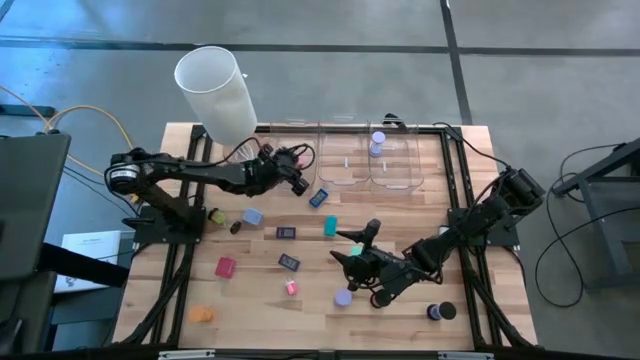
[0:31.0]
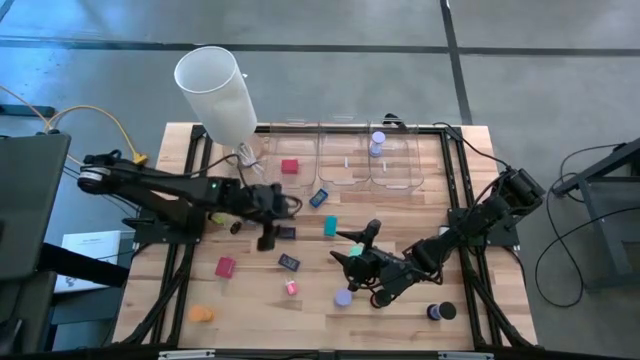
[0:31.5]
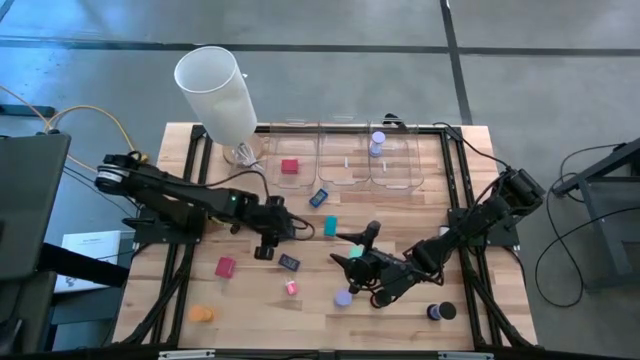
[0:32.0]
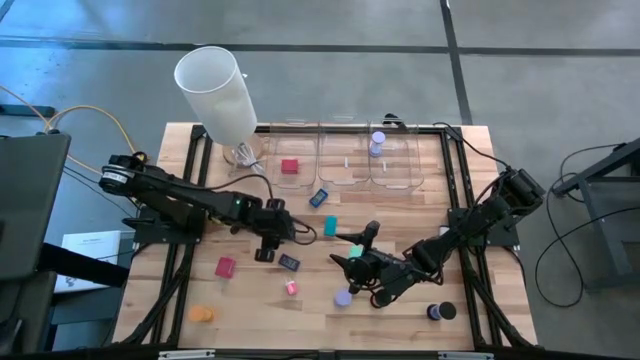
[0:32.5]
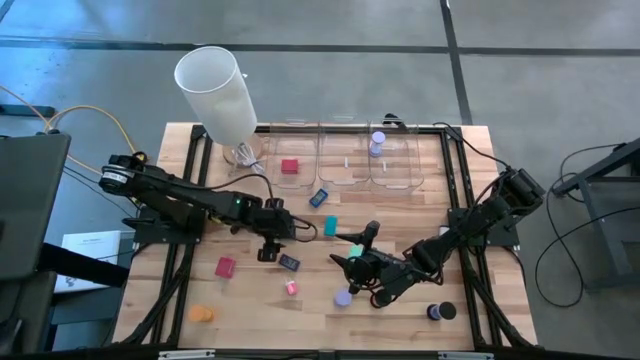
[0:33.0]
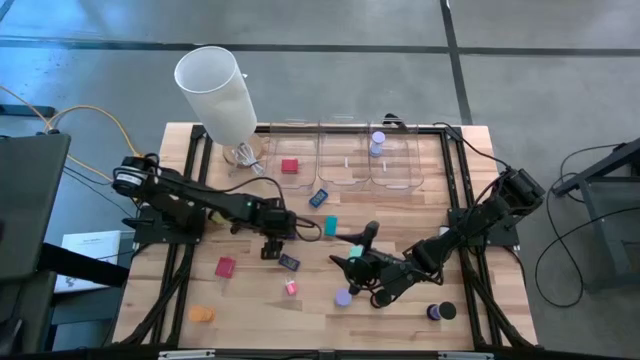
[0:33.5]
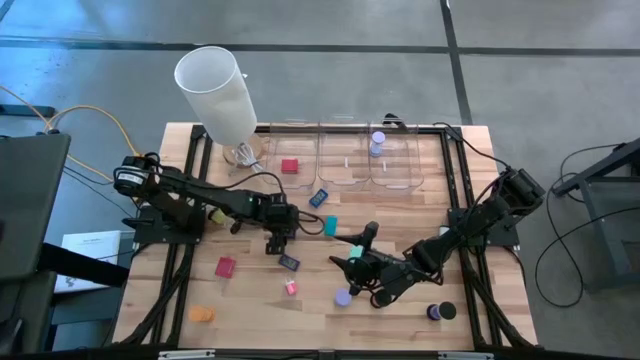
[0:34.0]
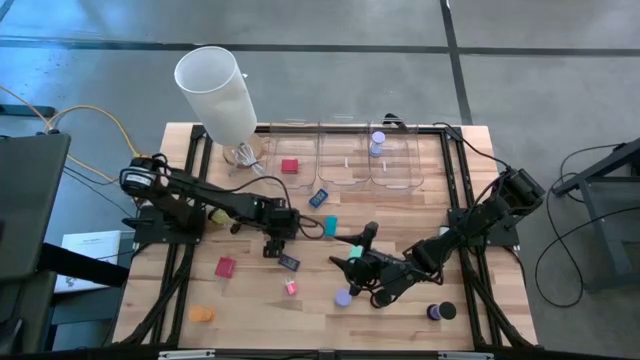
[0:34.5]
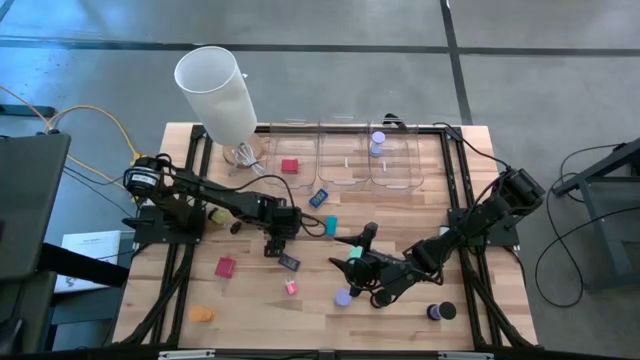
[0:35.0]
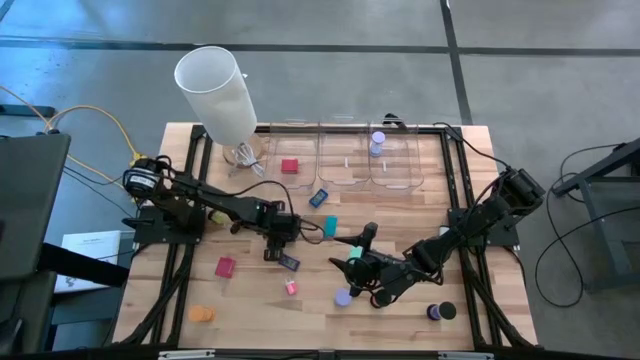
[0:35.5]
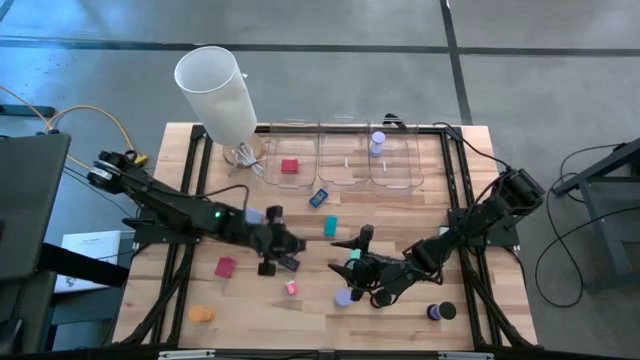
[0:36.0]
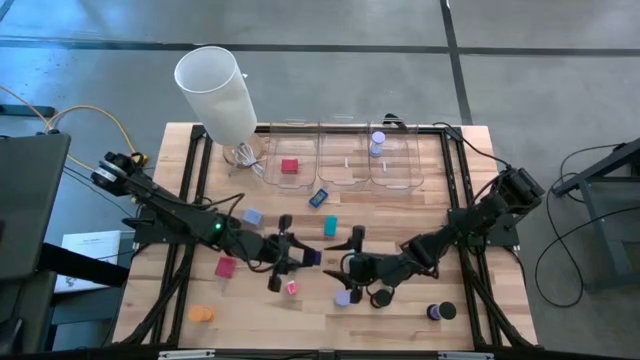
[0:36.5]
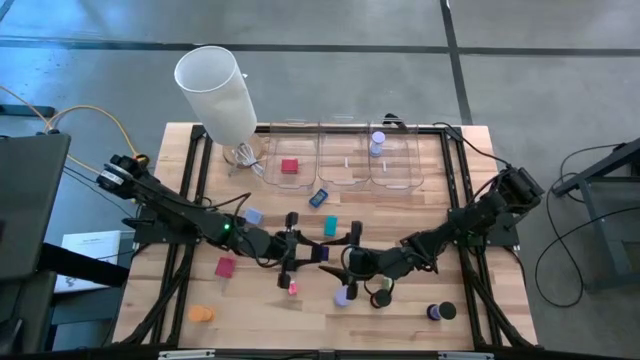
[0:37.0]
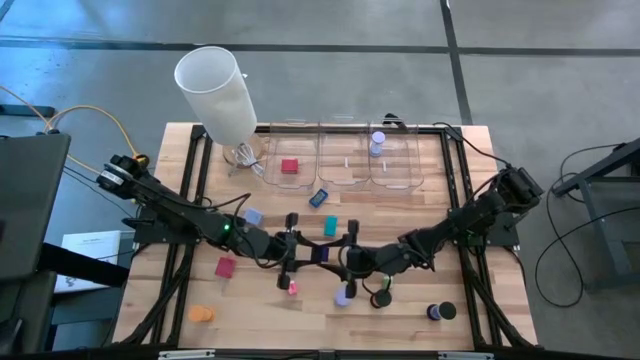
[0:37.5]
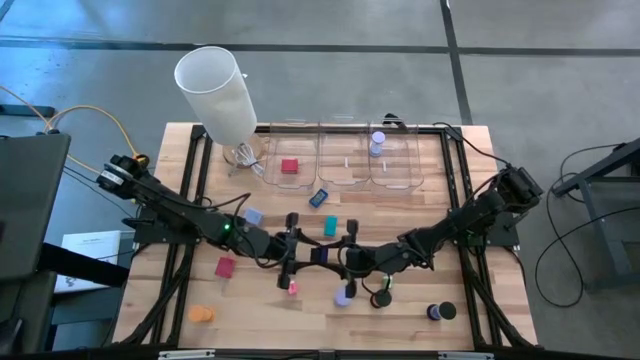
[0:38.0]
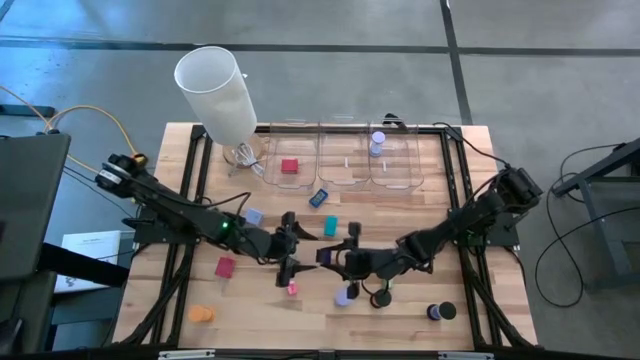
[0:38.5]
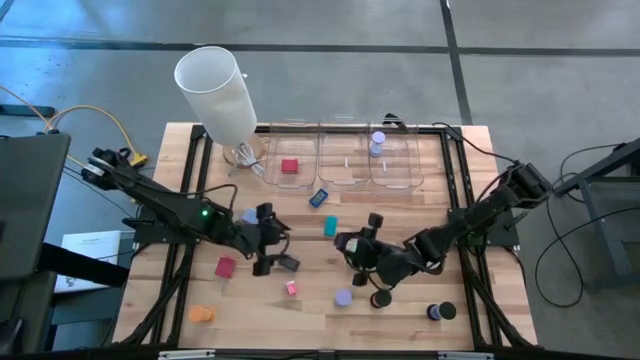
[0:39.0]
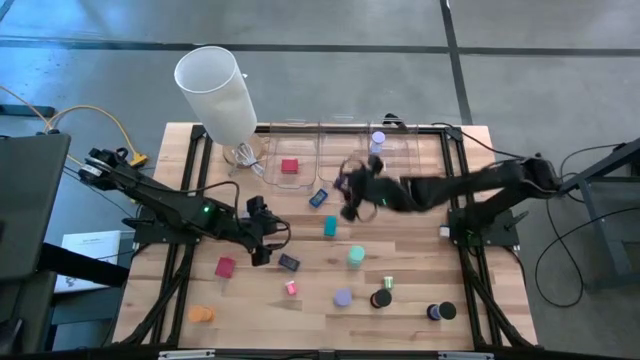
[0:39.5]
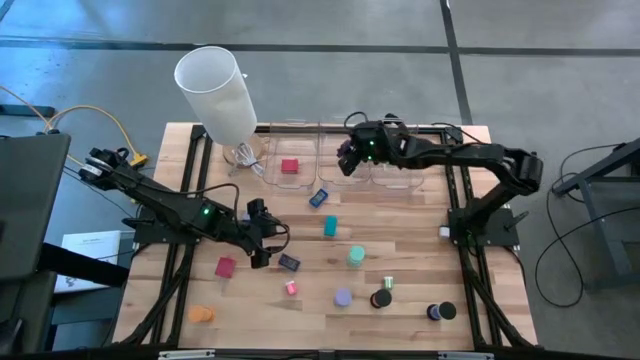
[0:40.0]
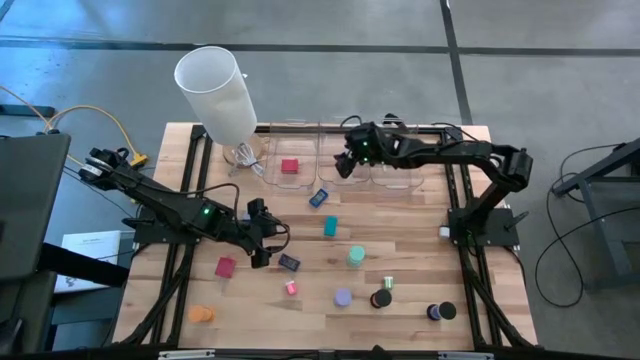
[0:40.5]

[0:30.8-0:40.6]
Task: Pick & Place Office items
Put the top purple digital clock into the middle transparent bin

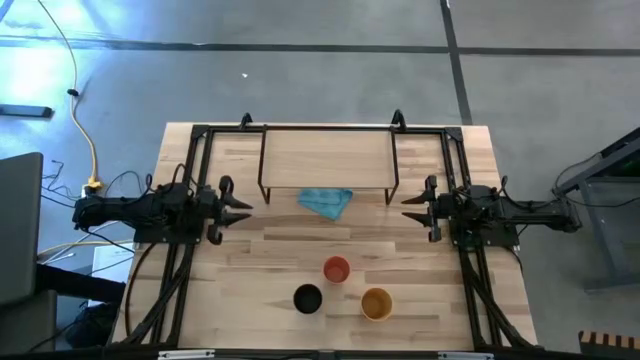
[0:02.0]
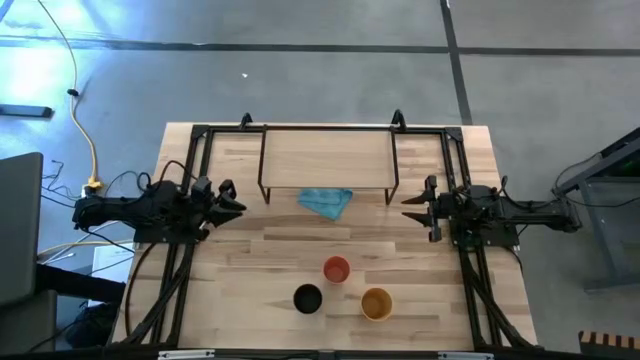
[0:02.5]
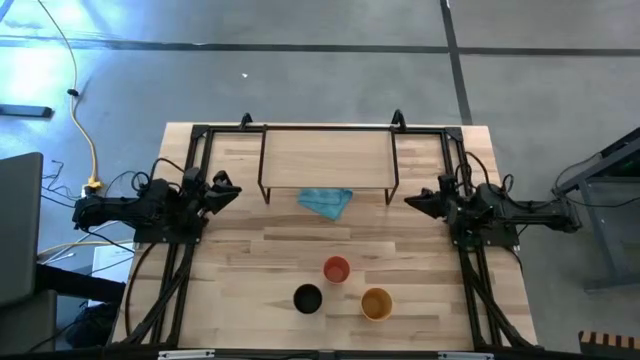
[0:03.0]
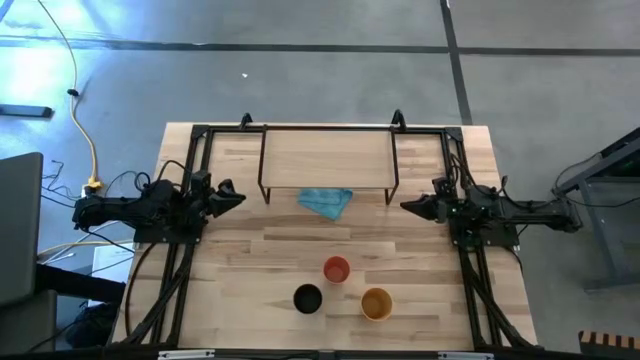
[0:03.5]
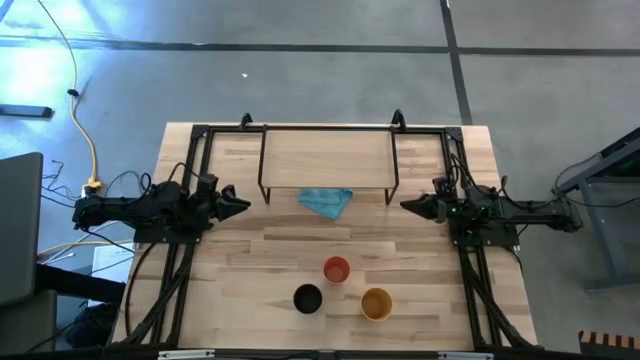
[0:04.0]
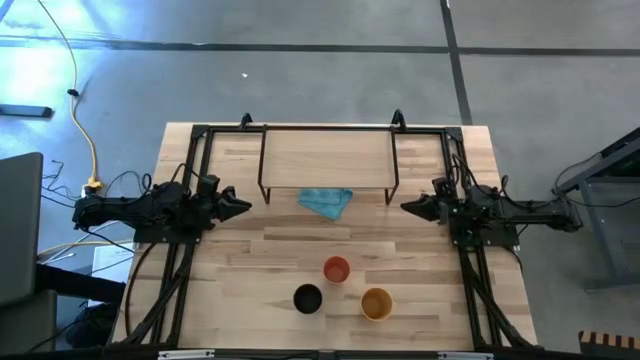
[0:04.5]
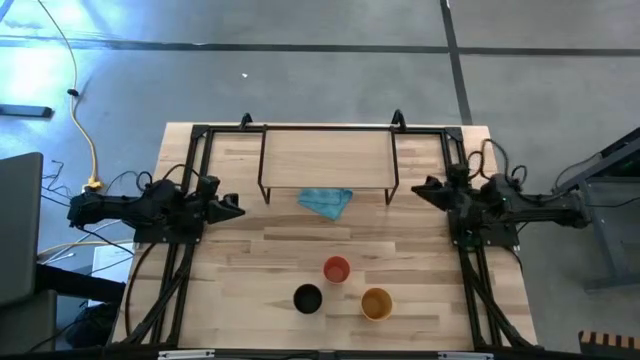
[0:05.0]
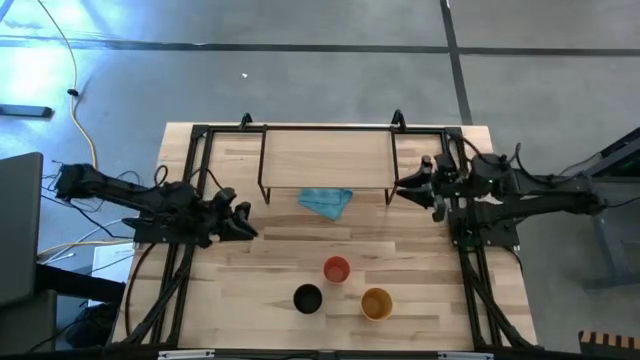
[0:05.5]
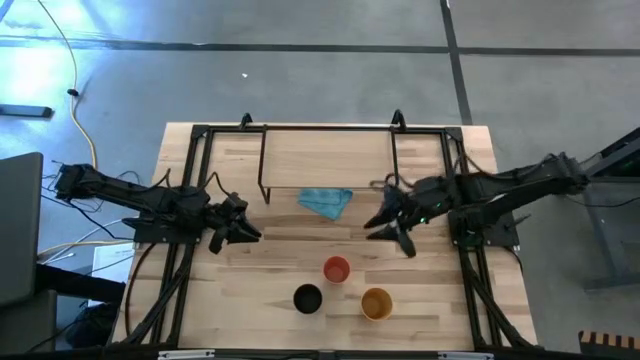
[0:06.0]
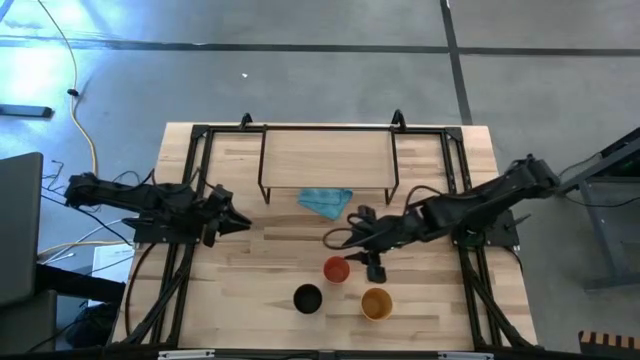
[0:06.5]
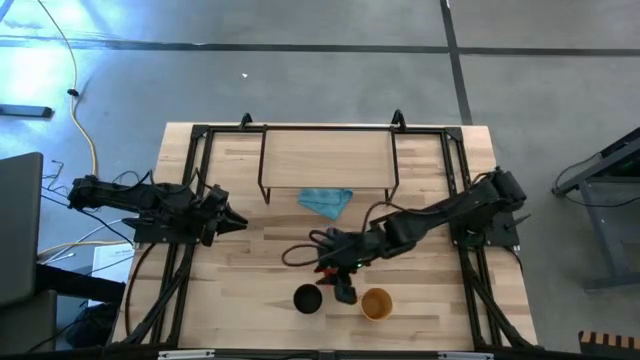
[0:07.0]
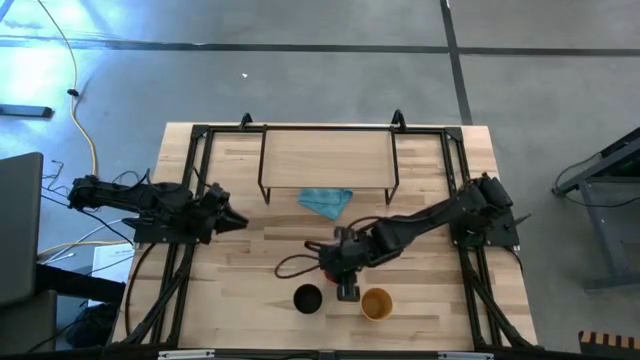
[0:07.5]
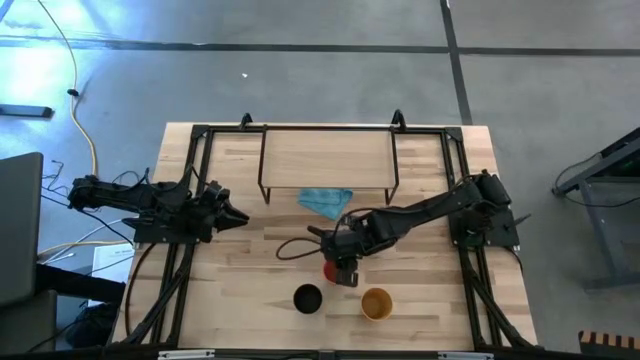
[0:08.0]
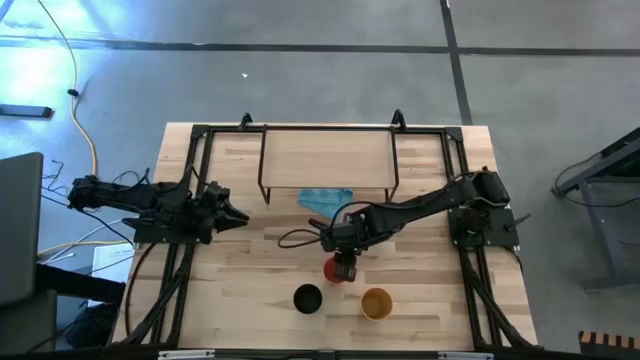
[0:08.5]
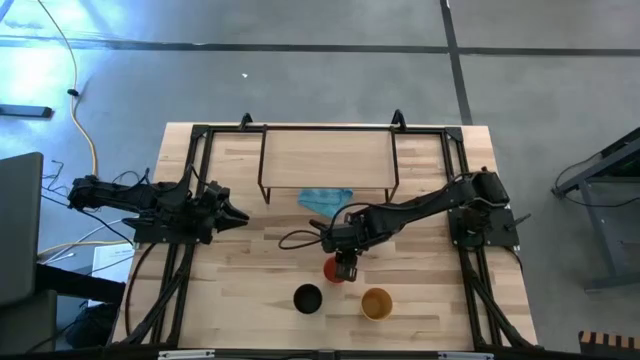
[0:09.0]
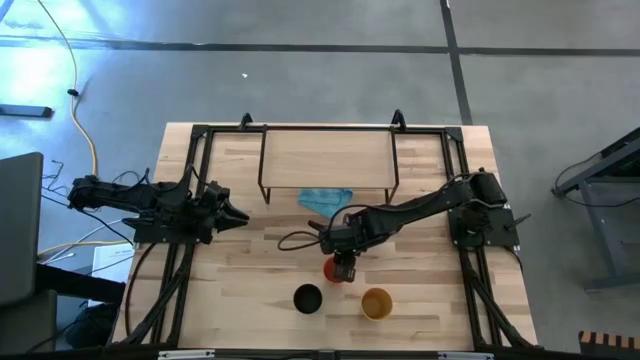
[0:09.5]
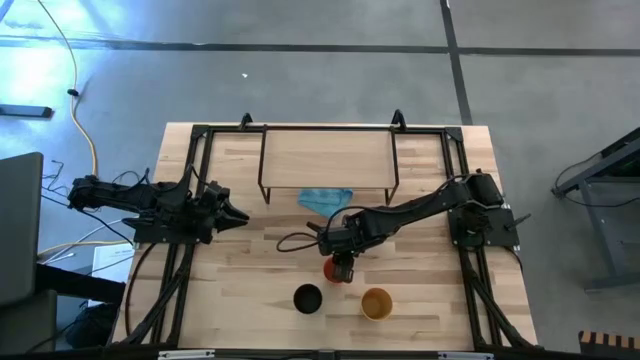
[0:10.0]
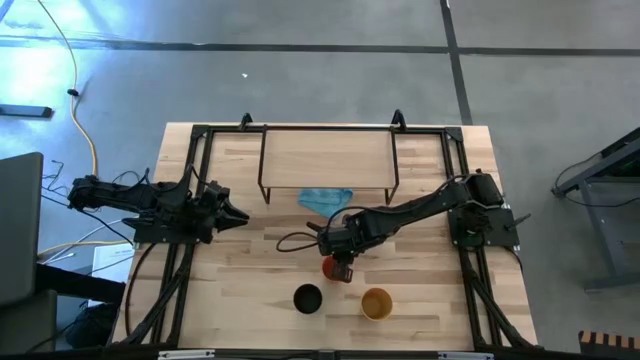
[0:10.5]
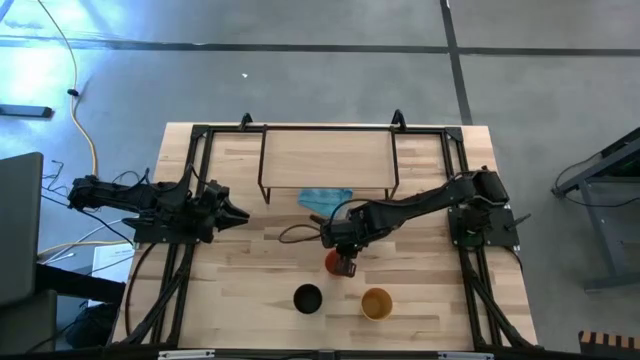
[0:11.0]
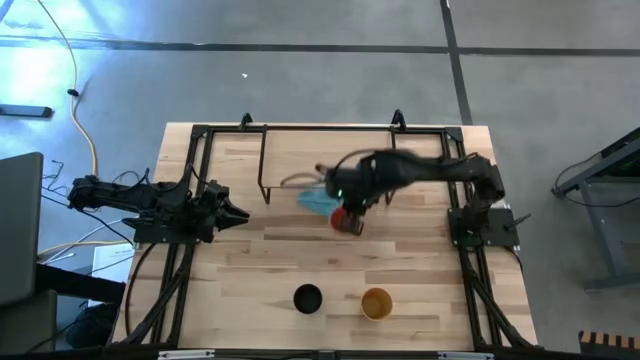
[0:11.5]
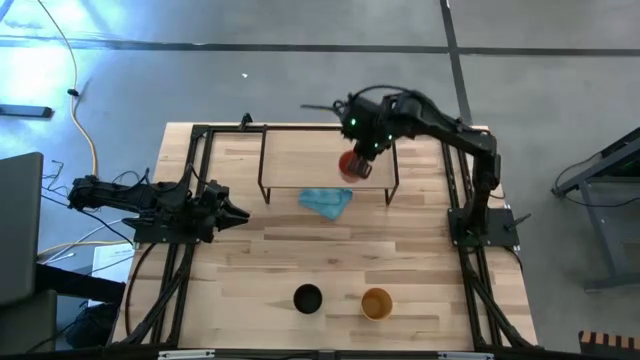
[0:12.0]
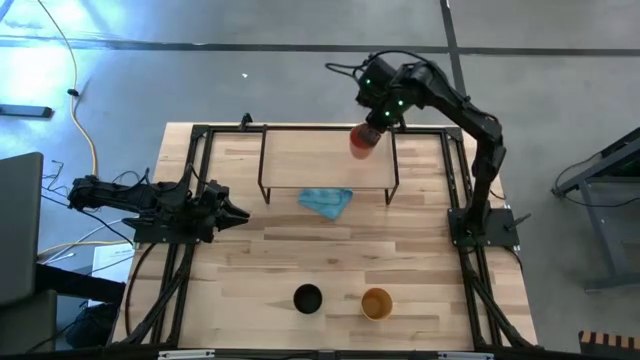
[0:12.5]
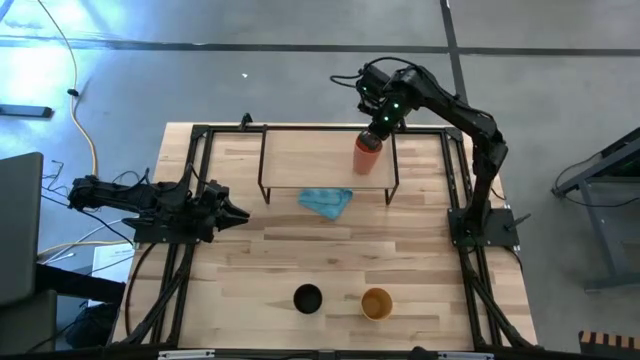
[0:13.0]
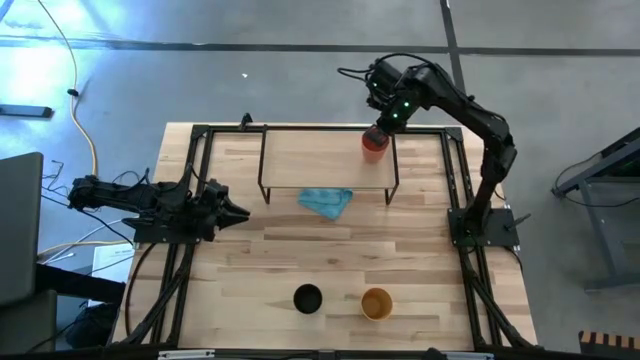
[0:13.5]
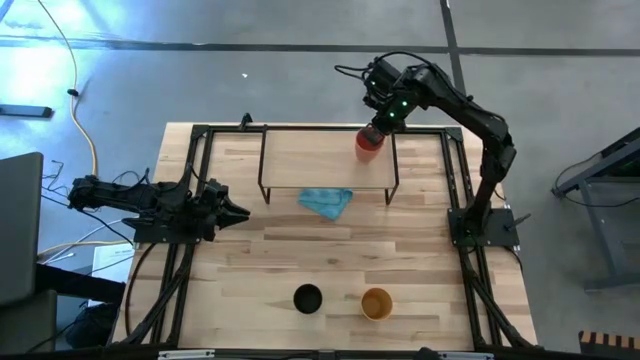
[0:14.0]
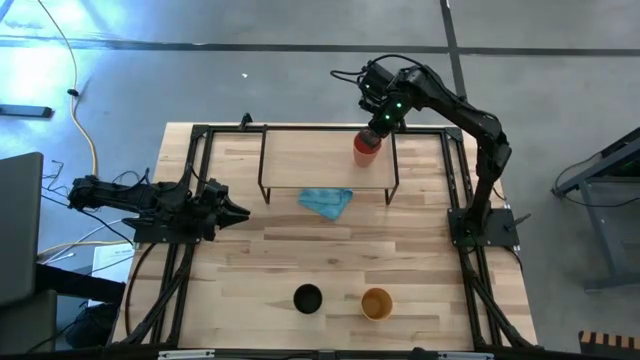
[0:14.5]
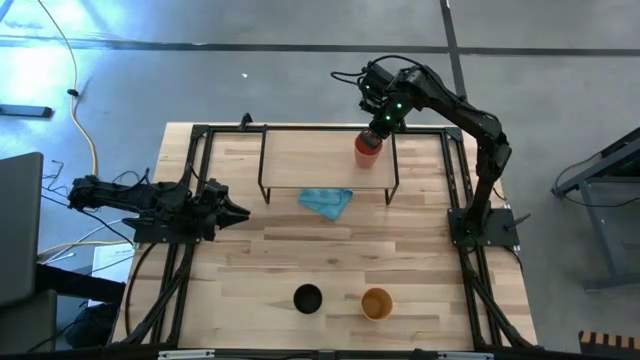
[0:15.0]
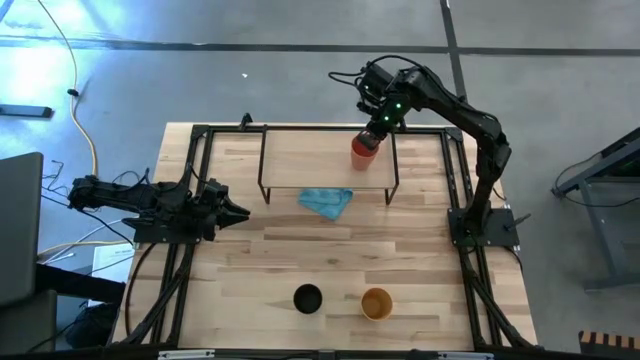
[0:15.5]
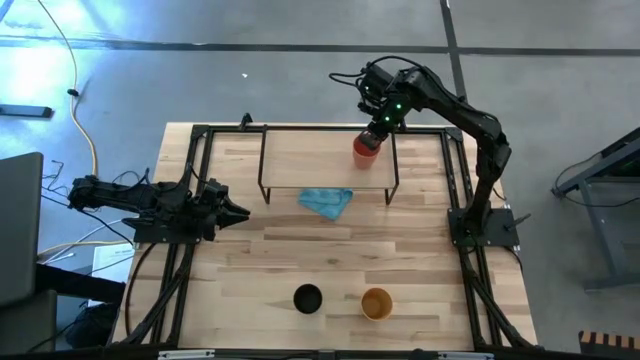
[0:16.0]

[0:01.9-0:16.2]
Task: Stack small to large cups/mugs on shelf
Put the orange cup on the shelf
